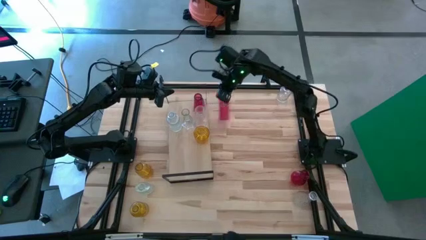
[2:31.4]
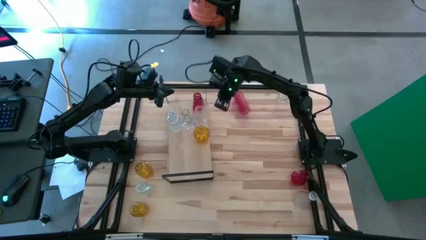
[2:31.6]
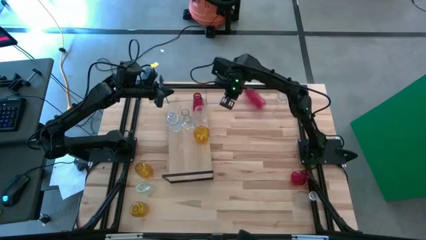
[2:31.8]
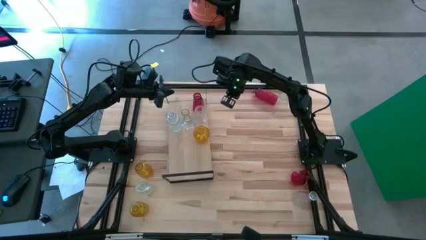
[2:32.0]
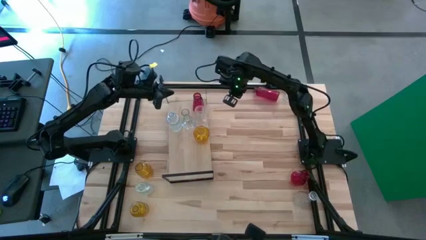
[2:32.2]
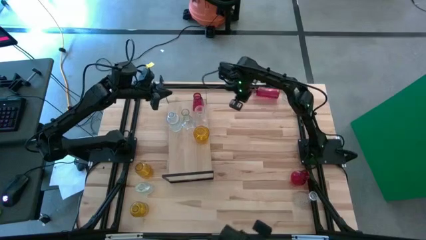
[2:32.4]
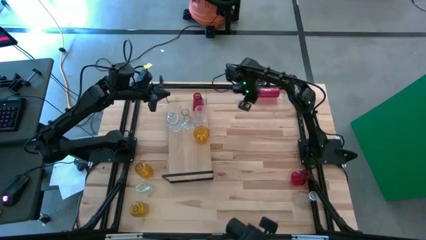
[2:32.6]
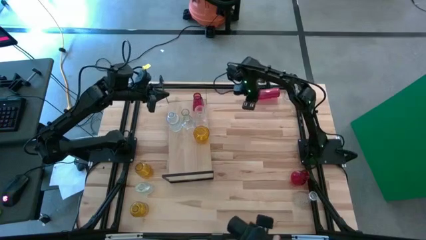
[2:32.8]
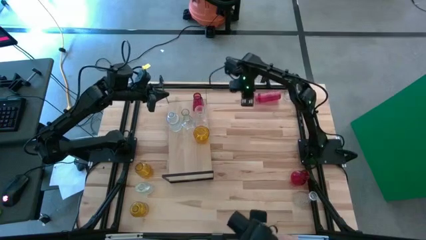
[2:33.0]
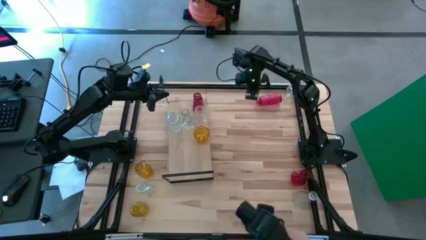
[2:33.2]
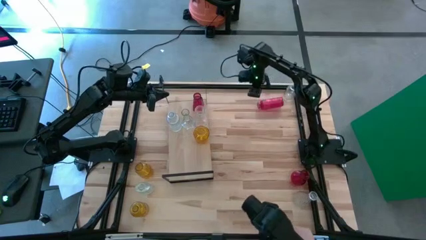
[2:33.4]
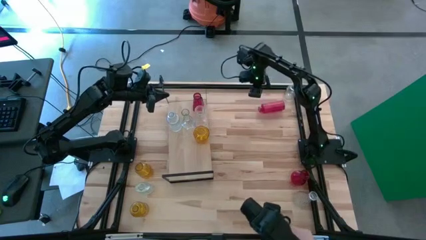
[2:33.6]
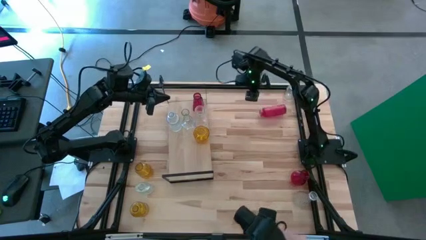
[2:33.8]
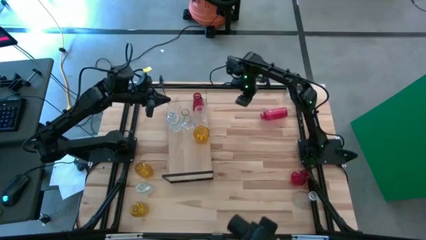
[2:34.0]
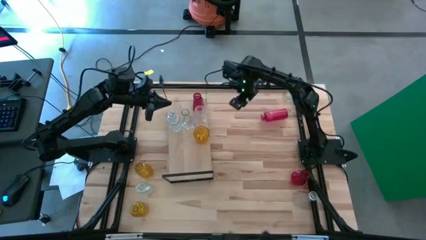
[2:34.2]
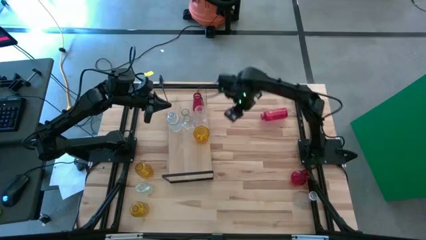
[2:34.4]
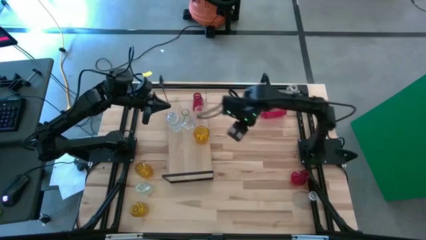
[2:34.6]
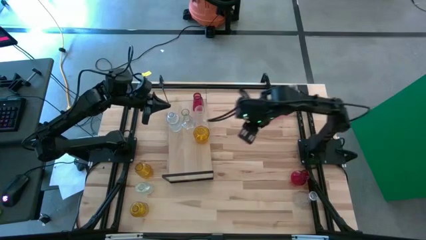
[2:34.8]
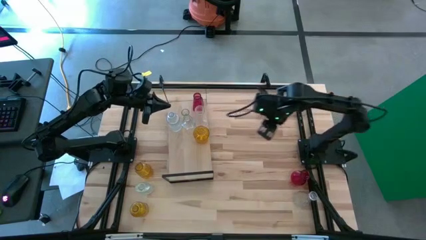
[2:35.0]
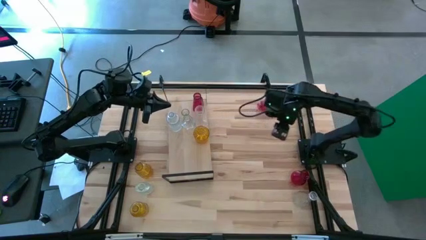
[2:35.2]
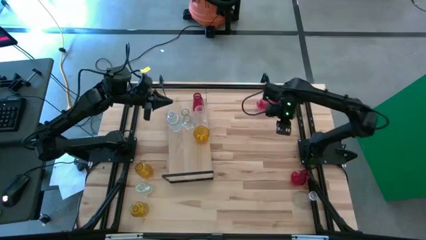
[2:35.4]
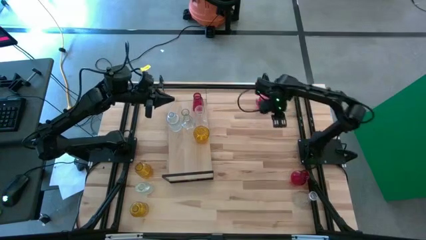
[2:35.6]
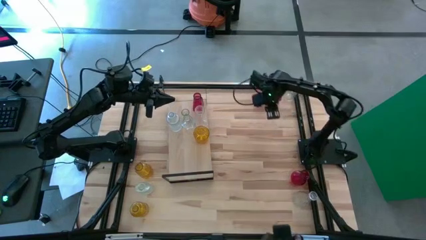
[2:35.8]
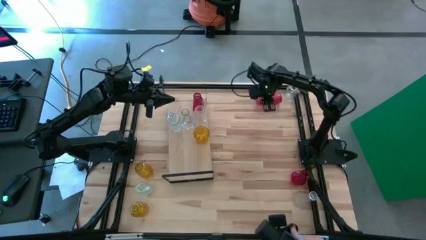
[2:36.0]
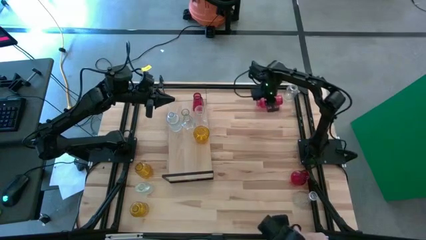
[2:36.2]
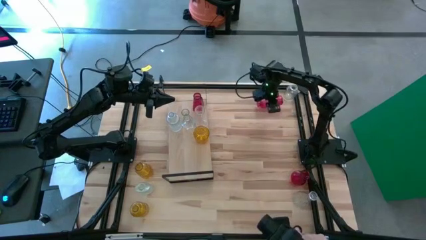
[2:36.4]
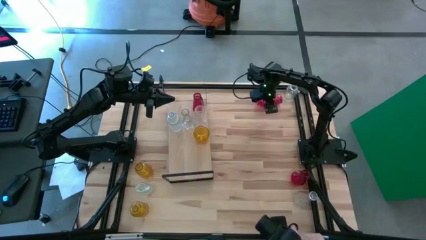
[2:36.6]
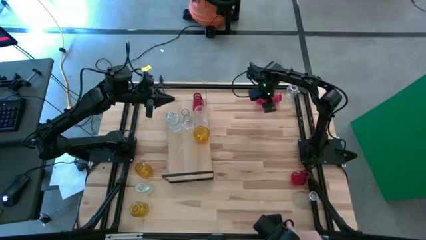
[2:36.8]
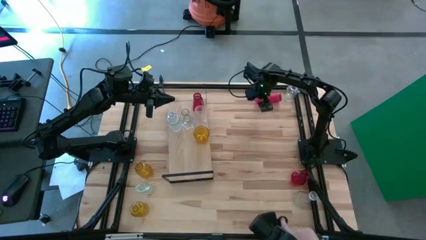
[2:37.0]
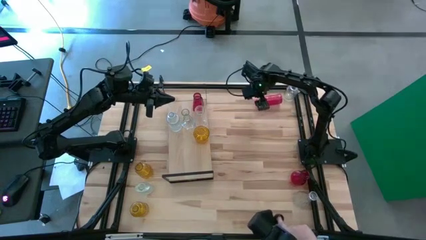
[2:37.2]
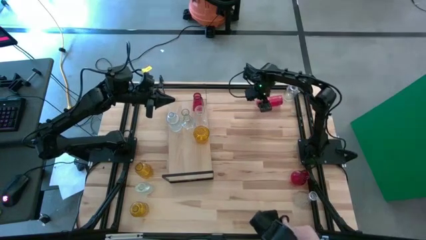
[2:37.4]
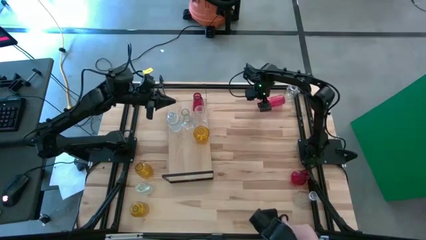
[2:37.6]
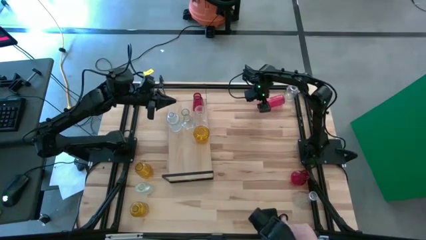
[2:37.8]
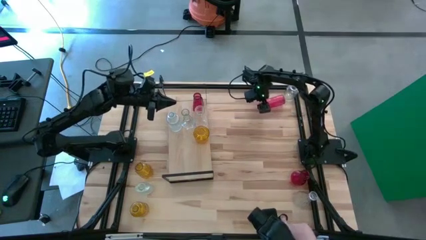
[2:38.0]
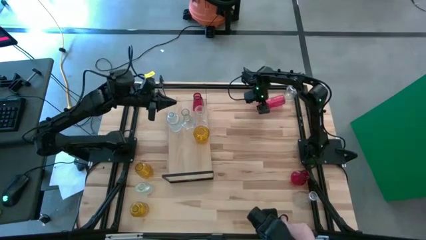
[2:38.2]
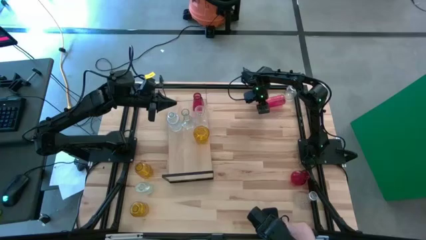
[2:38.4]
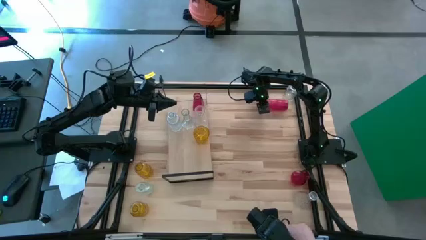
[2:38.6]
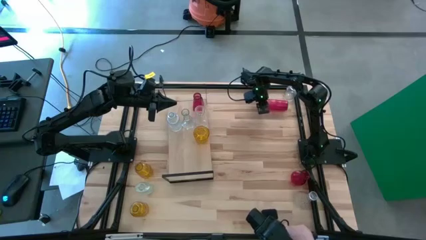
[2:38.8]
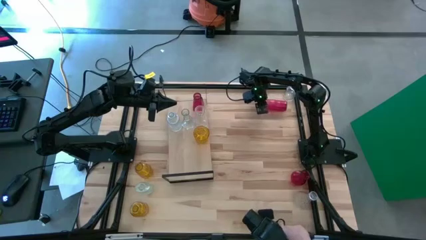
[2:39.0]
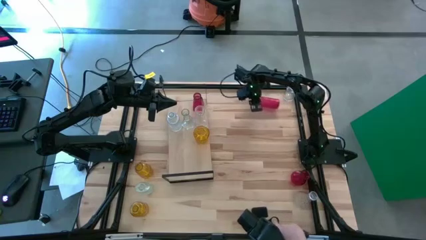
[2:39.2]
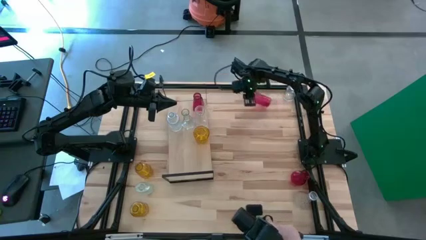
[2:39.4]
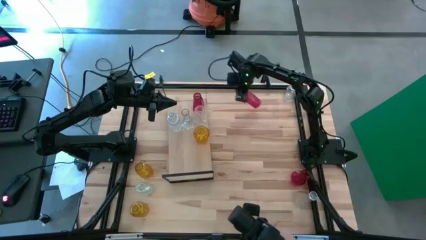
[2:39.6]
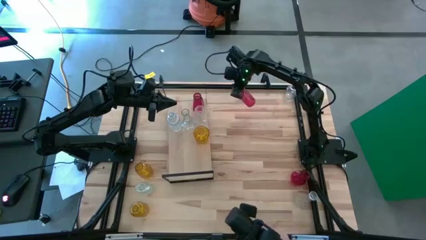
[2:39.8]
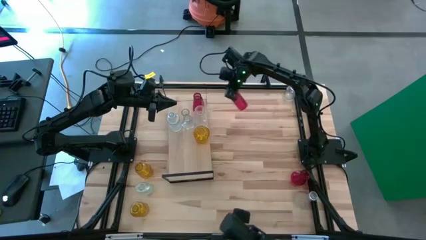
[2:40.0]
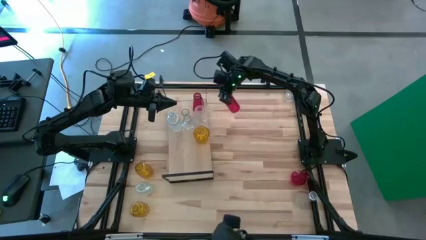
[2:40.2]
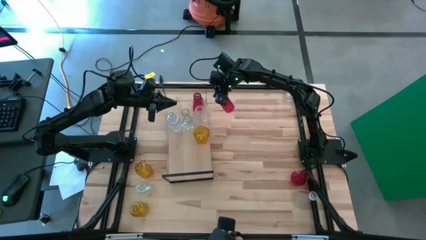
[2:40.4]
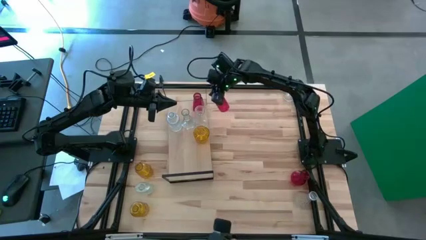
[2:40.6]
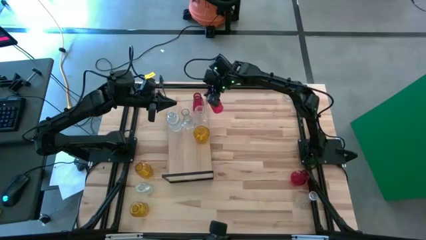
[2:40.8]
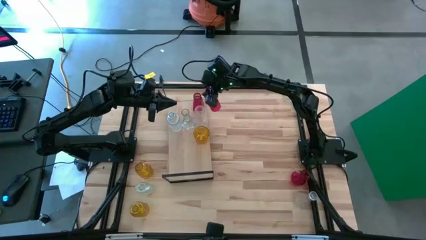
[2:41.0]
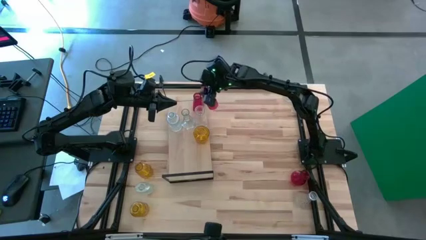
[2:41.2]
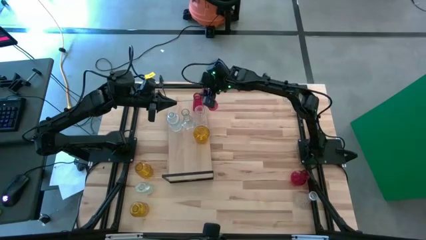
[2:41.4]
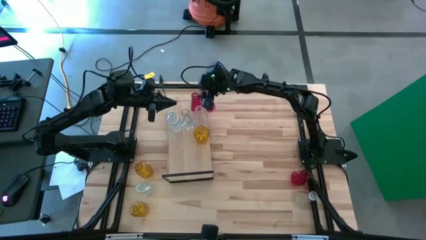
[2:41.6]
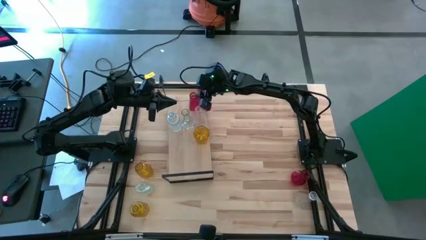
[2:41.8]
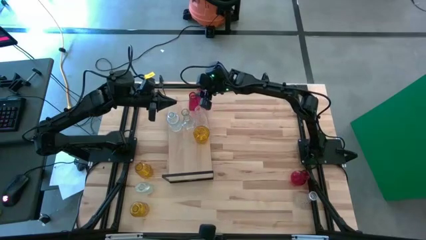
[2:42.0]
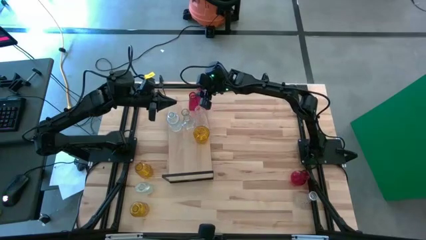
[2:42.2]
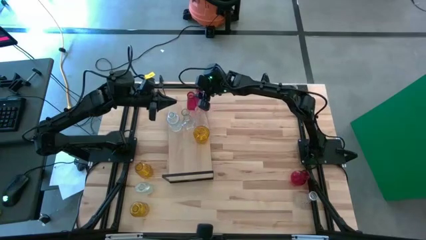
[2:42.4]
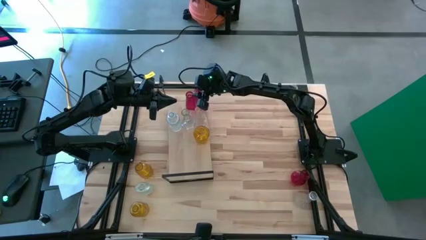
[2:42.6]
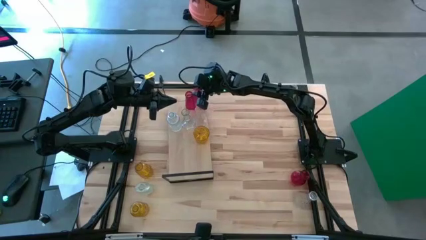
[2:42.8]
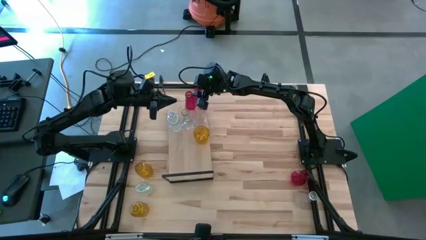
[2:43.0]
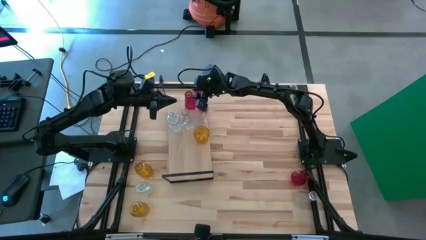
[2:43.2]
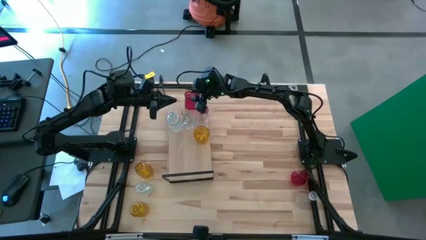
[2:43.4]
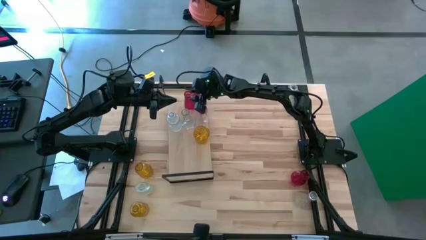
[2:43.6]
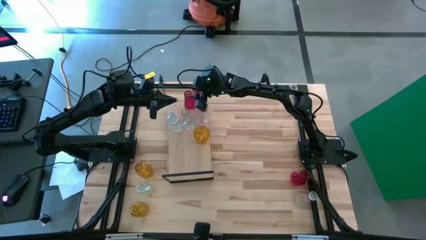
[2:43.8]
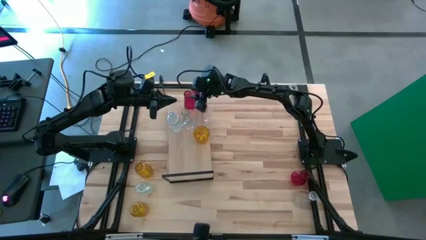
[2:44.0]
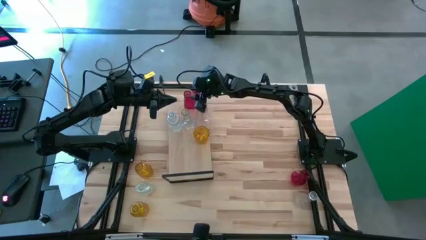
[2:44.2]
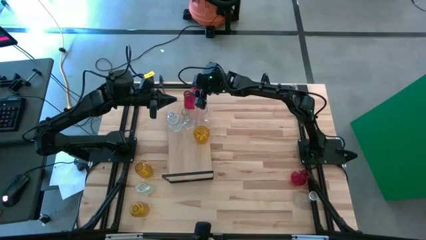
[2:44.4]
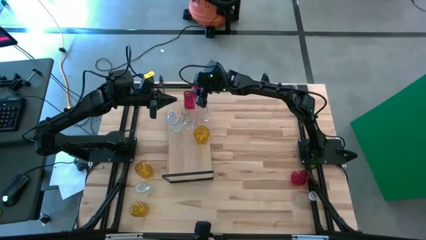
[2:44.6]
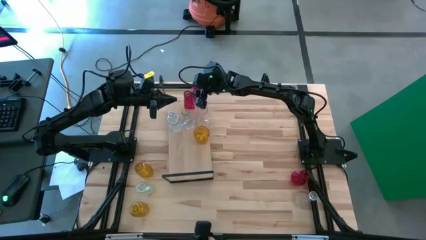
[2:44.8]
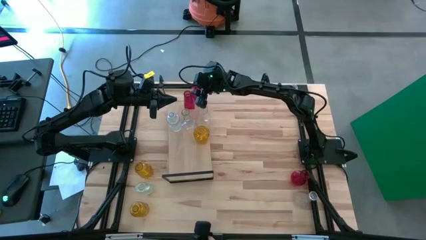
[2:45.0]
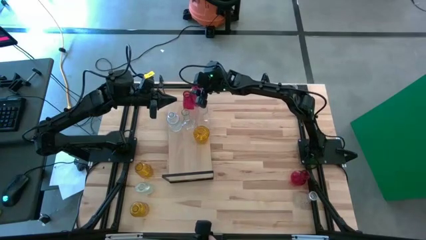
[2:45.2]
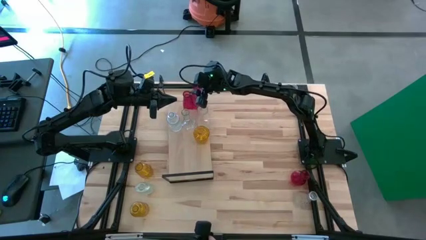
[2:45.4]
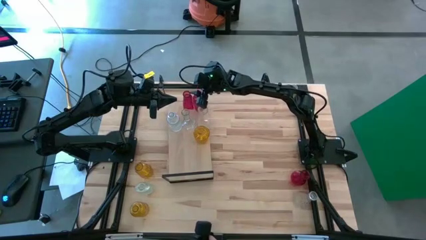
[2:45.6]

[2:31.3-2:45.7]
Task: sort vases onto shelf
Put the bottom red vase on the shelf

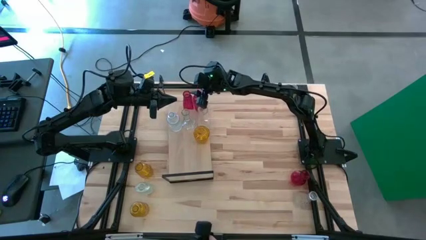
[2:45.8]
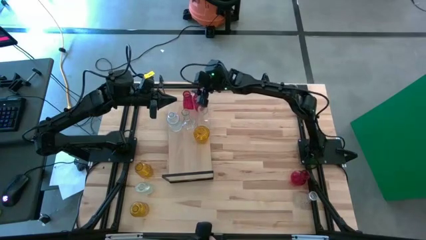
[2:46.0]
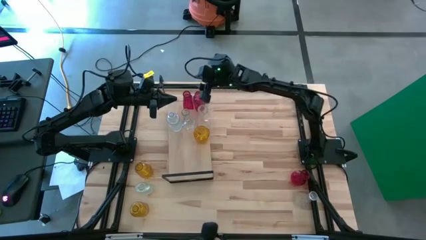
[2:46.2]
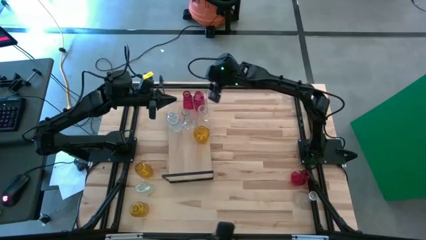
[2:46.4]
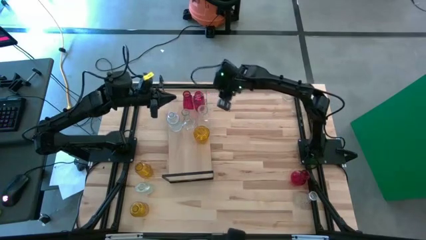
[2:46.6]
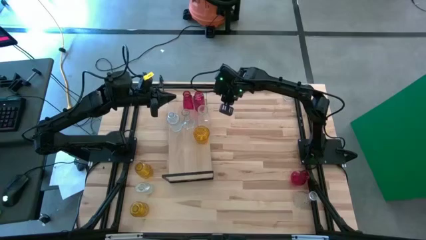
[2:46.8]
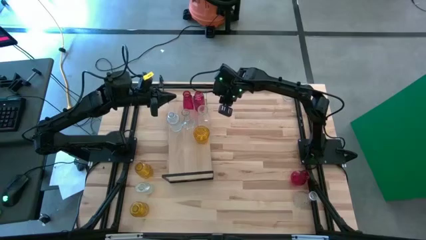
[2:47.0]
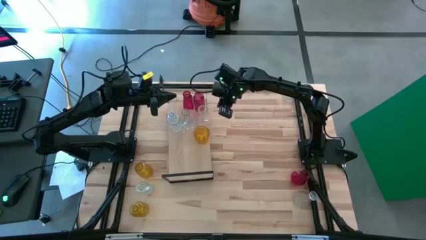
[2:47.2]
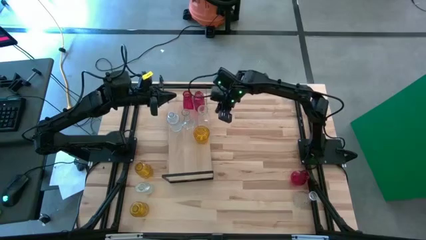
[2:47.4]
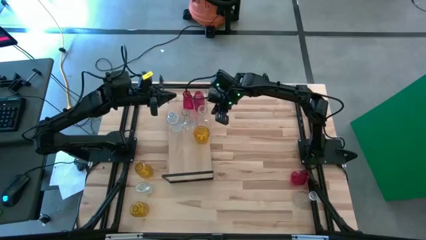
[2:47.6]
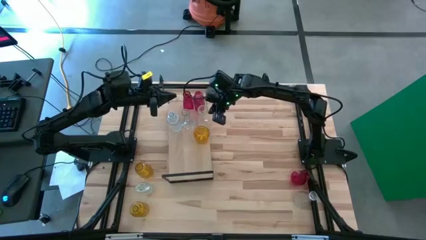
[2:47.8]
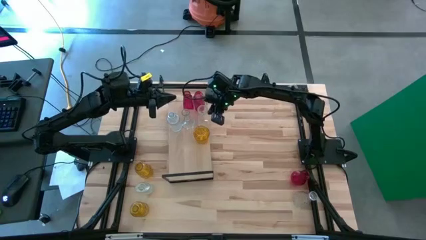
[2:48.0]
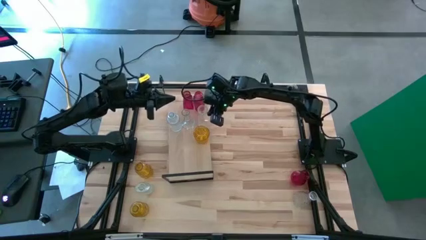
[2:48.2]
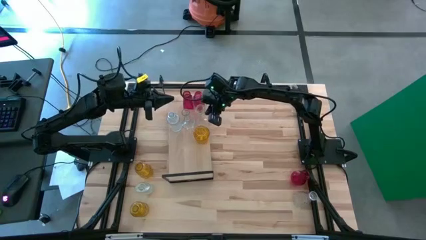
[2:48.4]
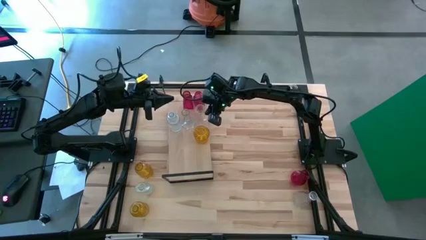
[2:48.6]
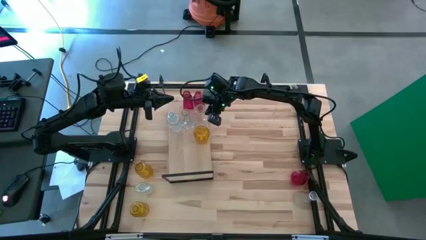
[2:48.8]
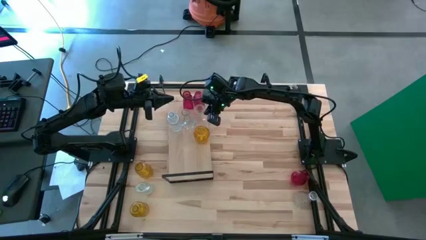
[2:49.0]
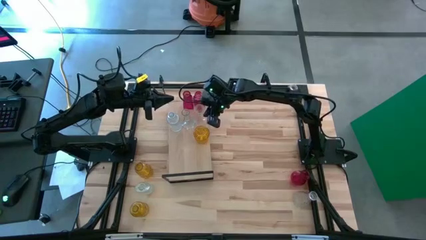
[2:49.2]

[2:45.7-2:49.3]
Adjust the transparent vase on the shelf
